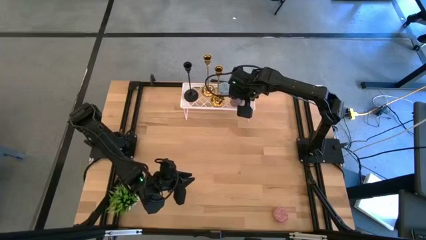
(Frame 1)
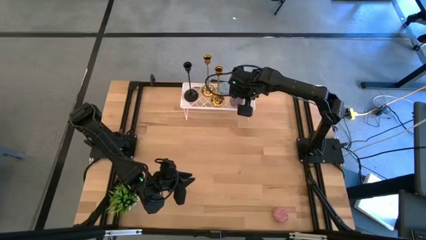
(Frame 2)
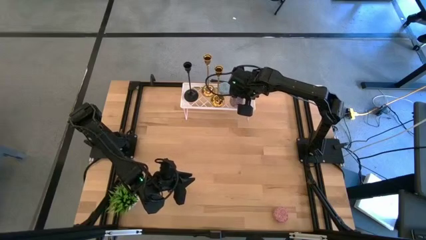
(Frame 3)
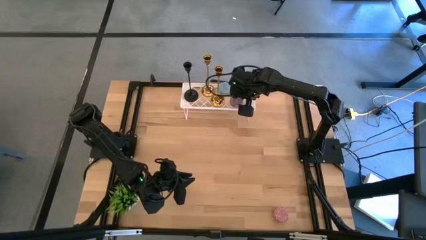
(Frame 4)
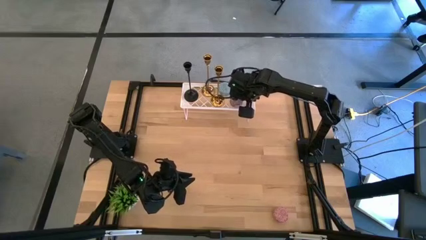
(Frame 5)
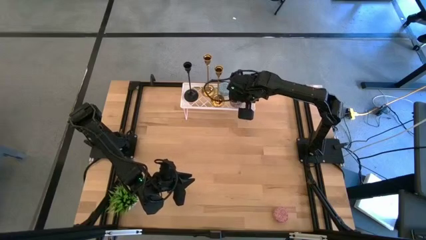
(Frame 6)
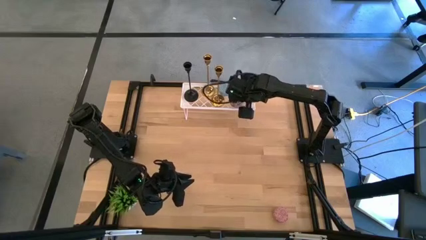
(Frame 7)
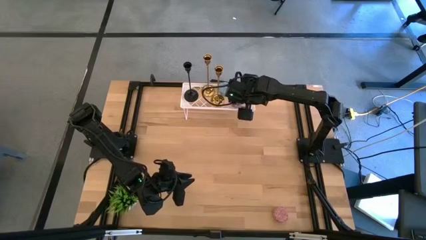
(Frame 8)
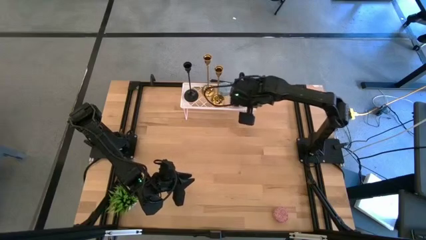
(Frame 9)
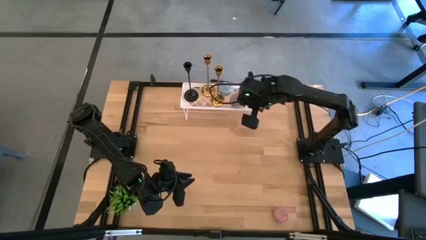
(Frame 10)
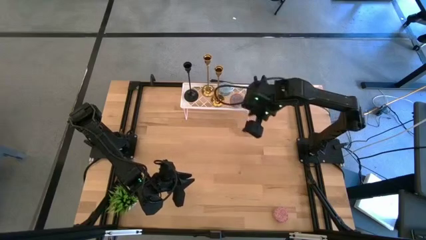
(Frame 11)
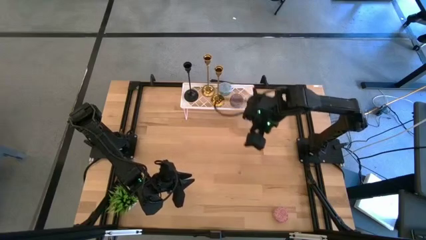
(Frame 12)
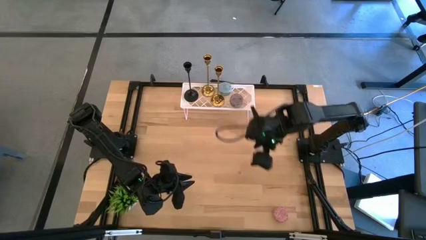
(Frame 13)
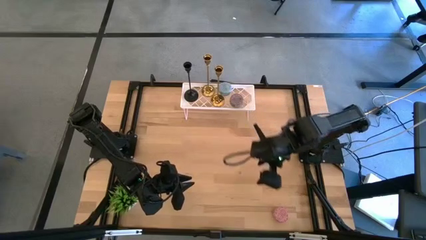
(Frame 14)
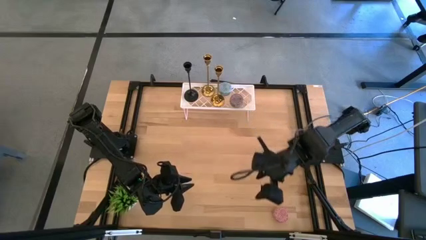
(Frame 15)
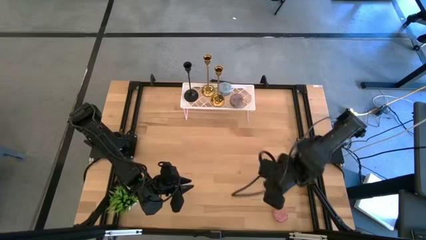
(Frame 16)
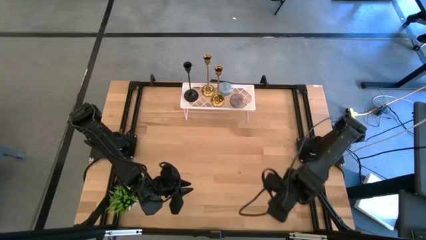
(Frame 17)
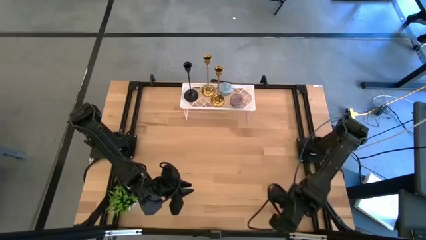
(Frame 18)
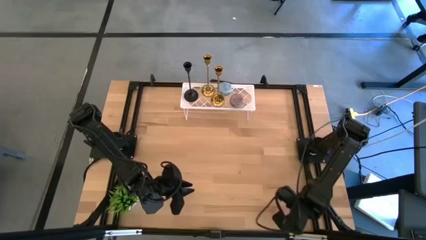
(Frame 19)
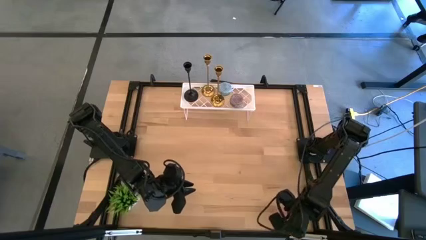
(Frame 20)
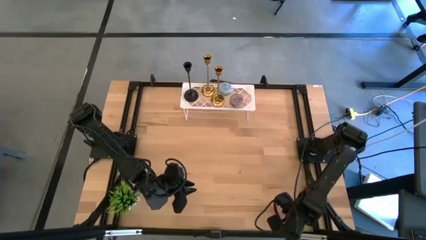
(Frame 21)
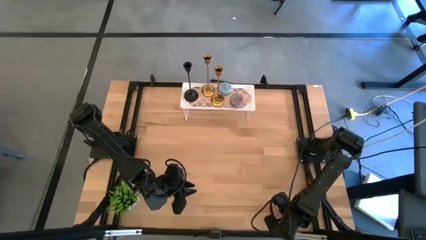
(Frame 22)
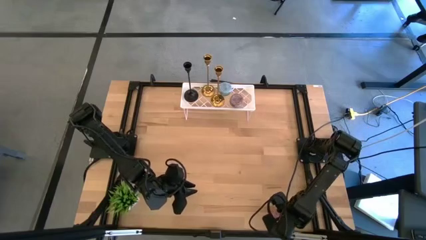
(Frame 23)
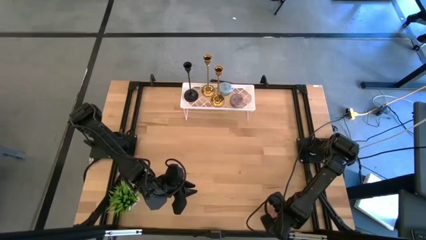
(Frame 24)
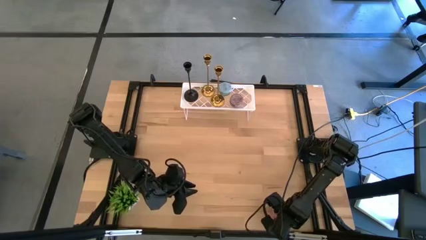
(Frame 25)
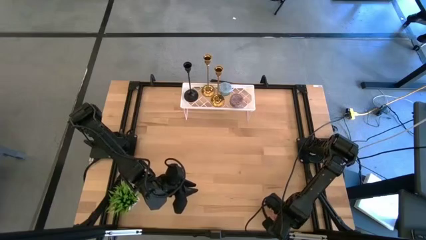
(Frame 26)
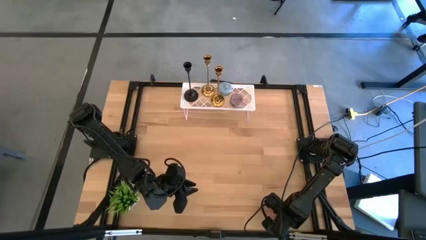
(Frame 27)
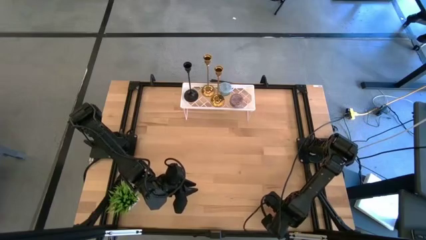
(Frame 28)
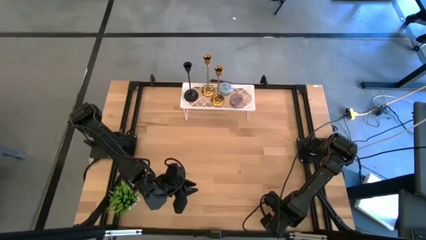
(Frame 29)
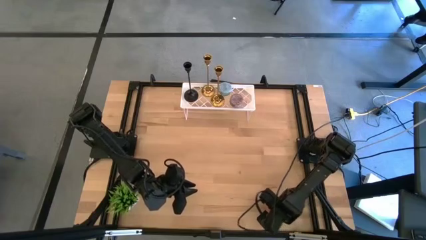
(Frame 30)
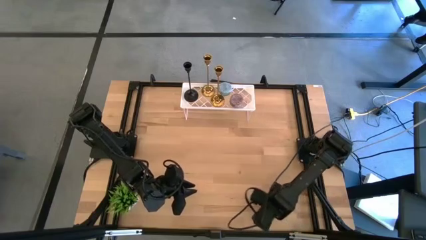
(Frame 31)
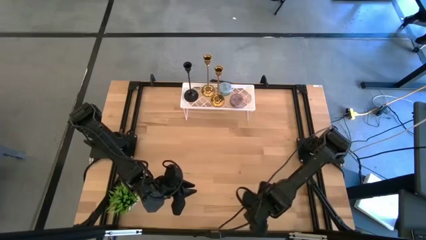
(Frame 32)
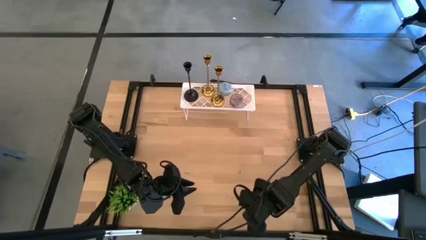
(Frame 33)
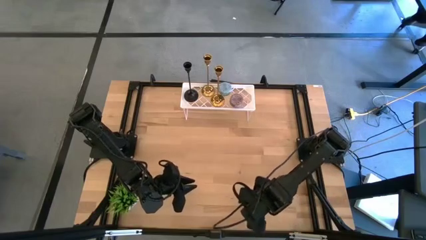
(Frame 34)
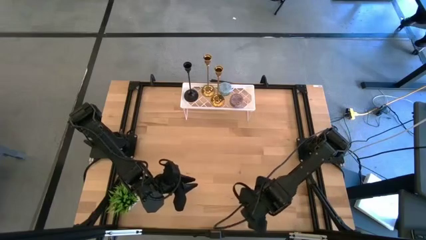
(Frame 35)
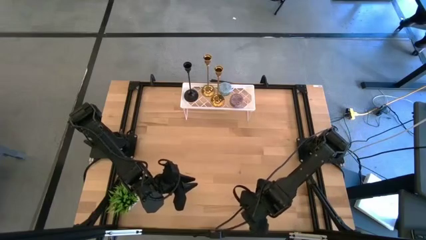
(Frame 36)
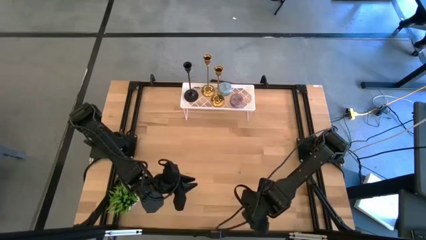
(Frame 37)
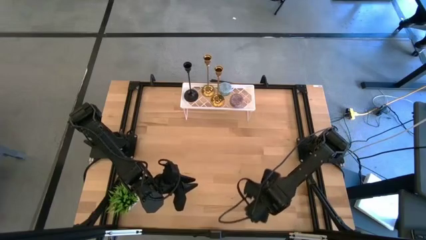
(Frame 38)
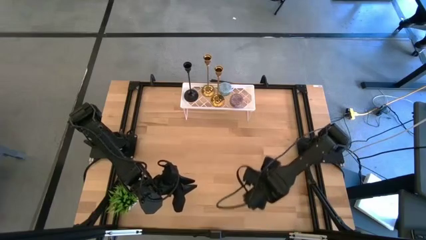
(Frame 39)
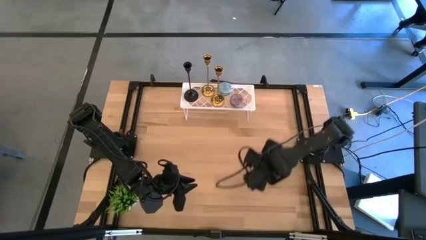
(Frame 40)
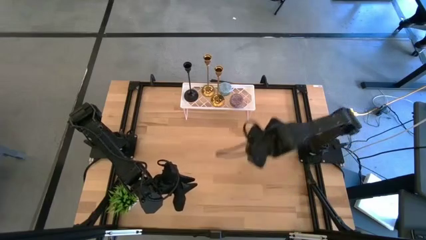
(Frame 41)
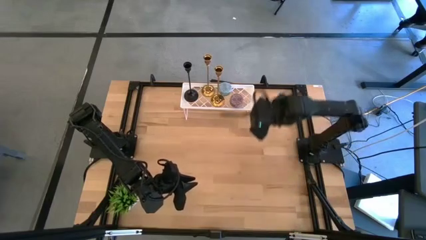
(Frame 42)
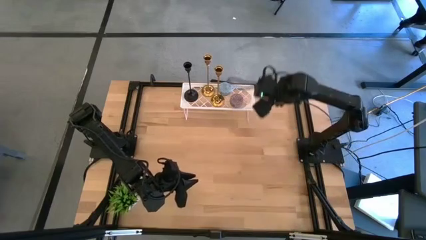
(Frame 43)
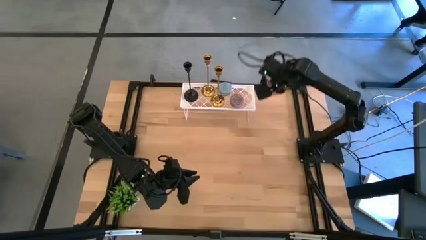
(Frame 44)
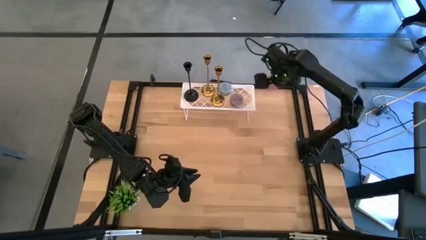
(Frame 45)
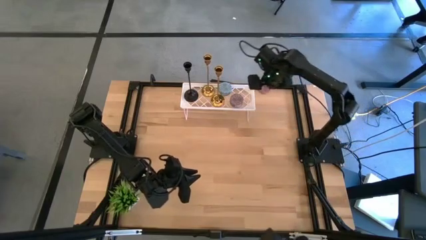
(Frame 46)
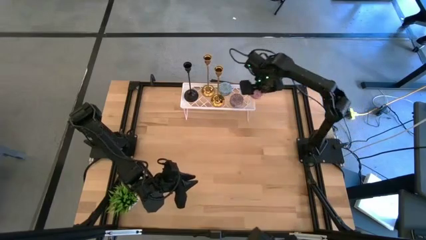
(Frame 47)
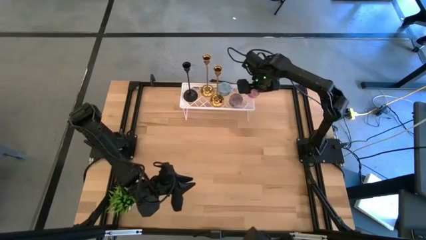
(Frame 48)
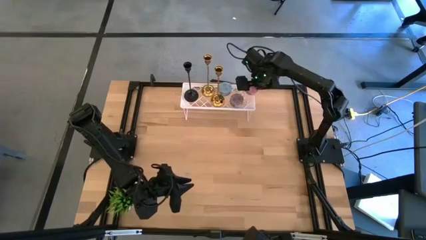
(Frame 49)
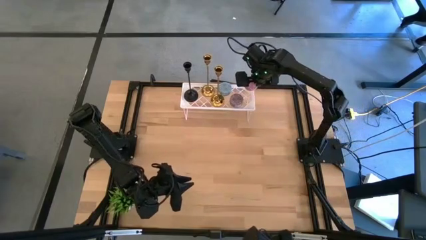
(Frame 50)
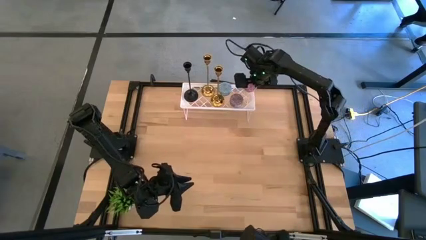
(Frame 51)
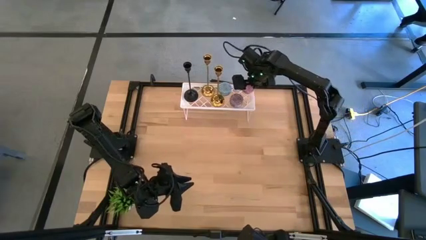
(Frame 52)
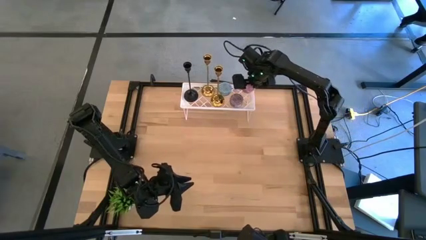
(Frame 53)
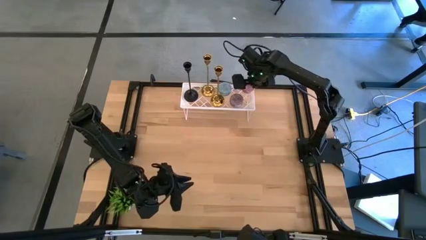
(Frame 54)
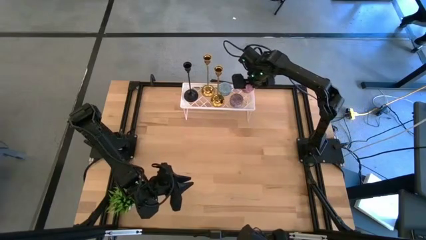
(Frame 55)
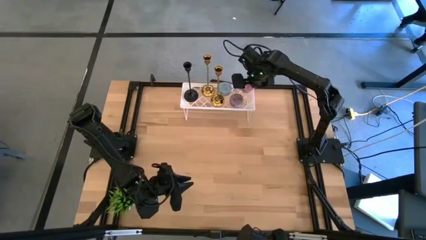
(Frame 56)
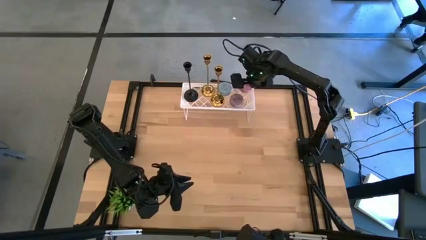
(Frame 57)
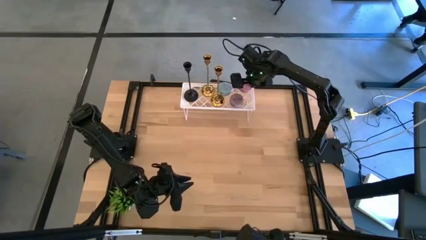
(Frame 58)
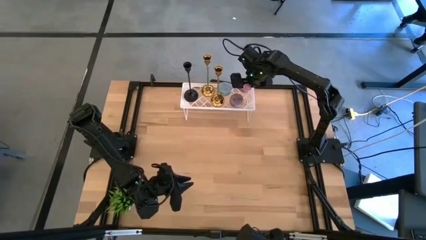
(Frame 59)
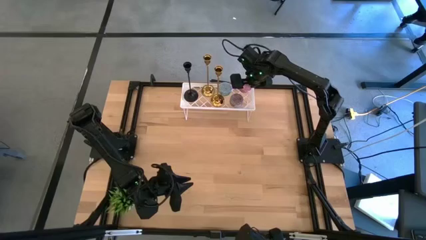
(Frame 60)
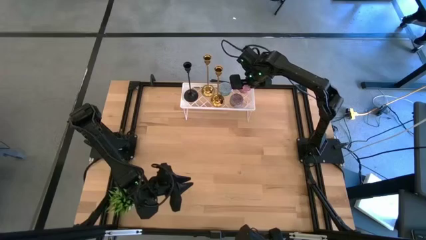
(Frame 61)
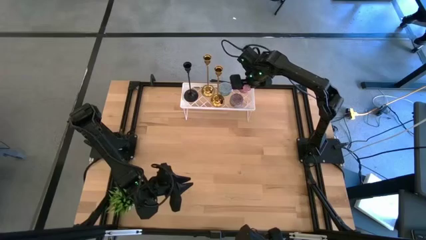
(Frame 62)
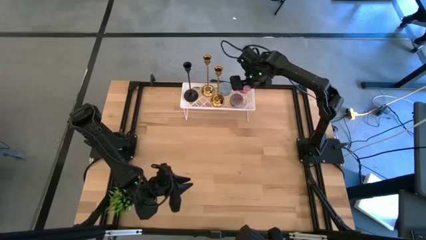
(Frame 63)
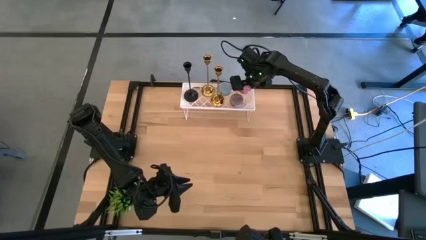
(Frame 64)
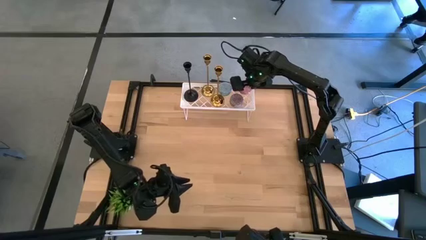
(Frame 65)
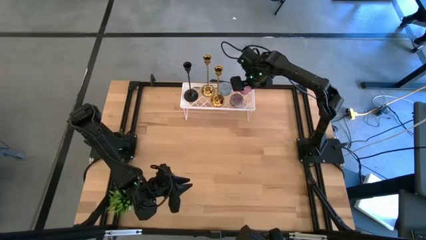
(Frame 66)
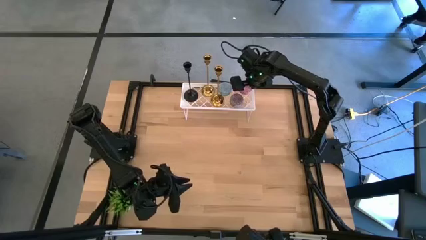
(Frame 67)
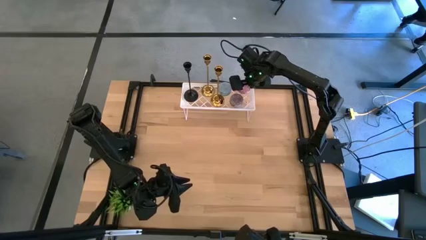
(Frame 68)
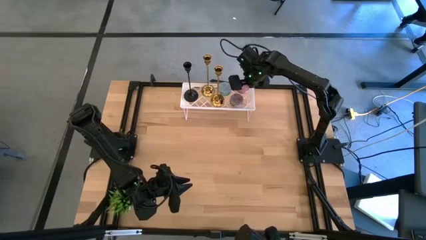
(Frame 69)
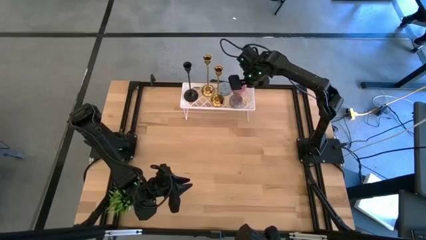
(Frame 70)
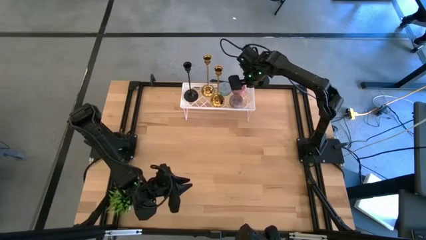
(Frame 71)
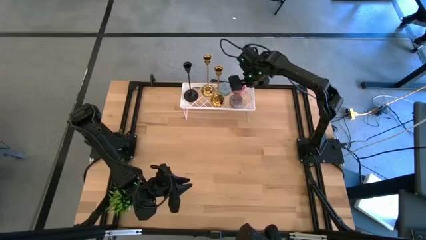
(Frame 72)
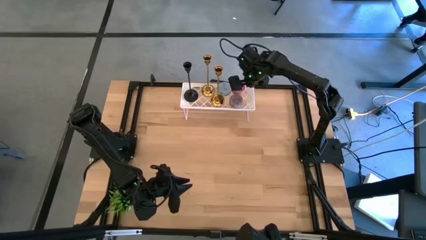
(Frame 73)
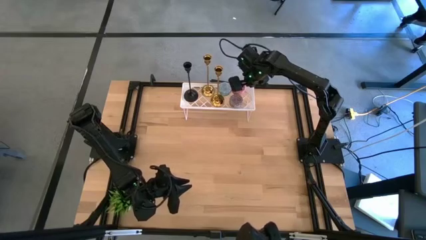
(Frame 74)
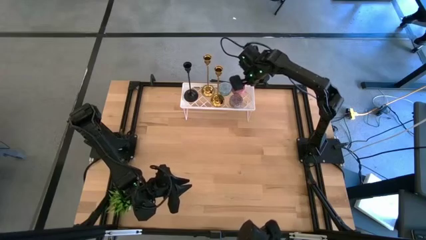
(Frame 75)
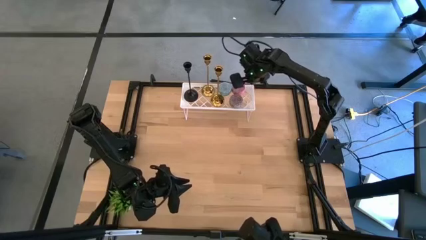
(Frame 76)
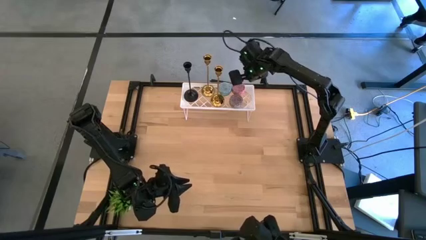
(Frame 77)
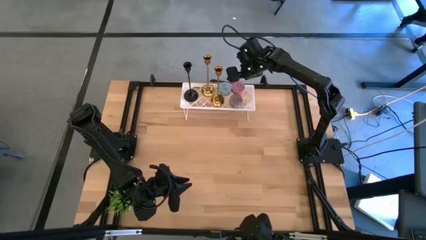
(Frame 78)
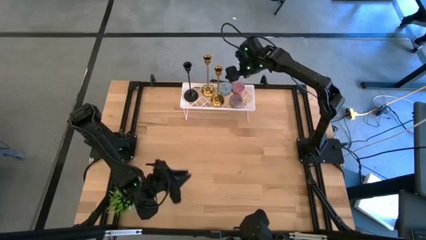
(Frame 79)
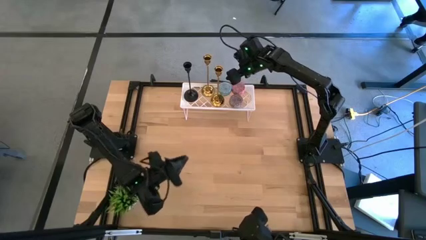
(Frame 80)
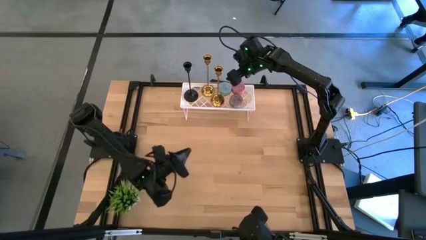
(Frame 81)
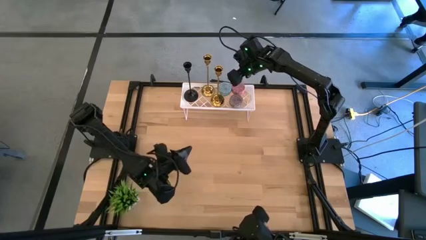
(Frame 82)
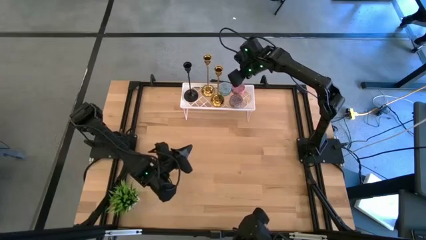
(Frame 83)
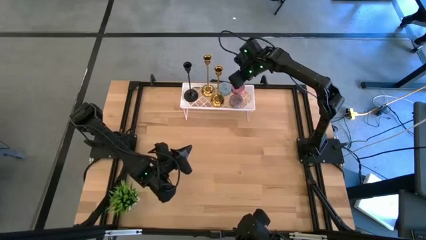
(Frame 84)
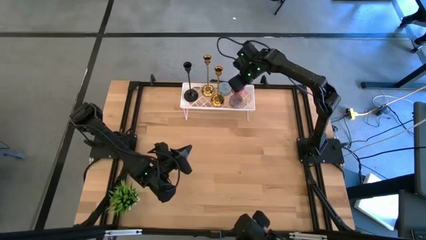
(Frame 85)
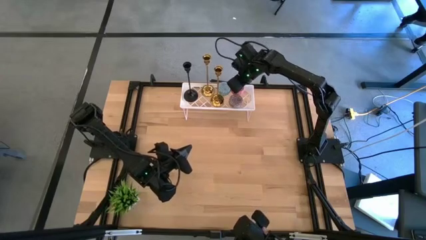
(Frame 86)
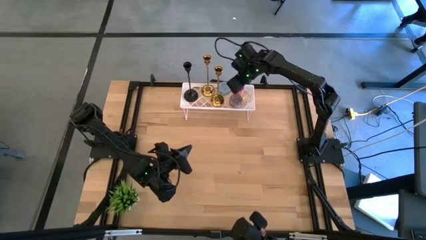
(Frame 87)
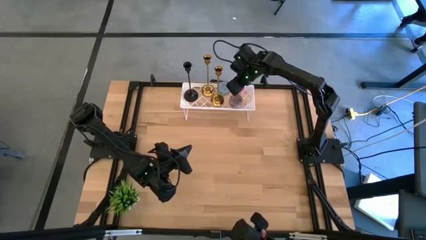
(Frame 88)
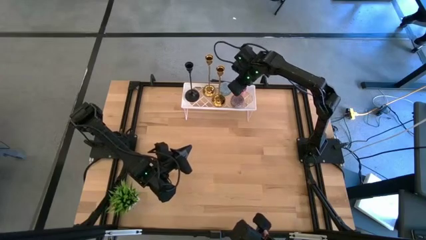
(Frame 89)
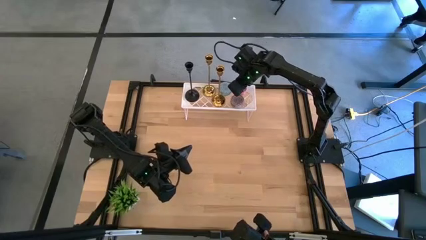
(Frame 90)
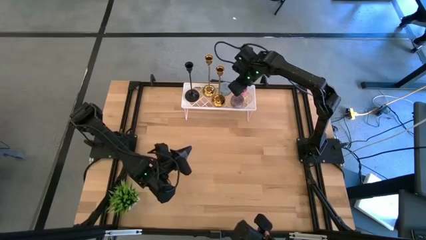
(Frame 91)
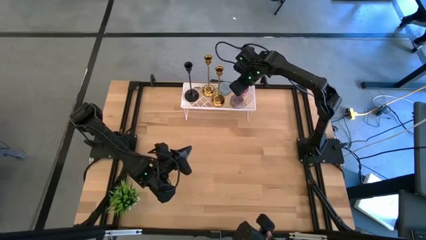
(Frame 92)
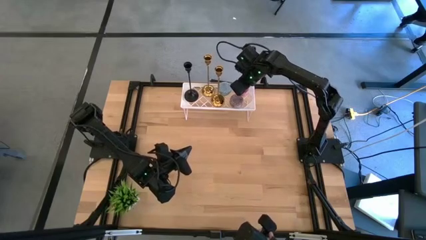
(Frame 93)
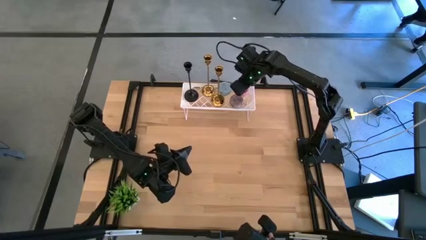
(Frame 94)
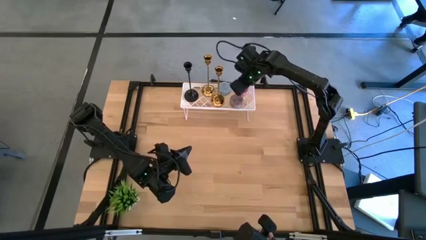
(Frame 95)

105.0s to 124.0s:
Task: Pick & Place candle stick holders
Put the pink patterned scented candle on the shelf
